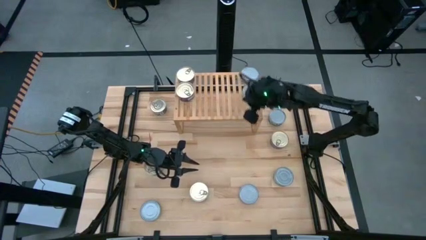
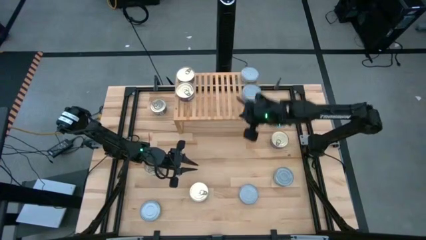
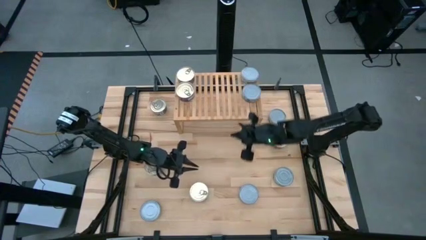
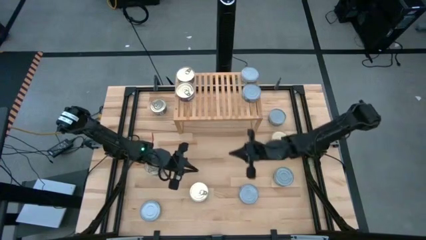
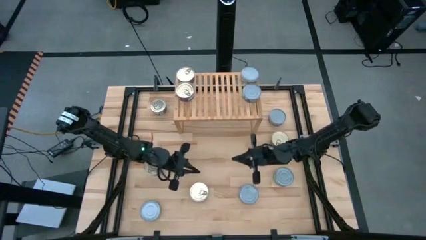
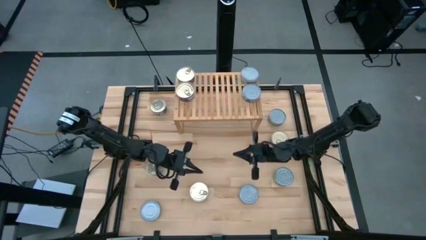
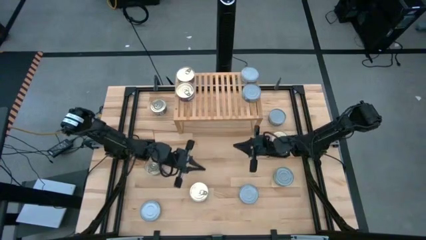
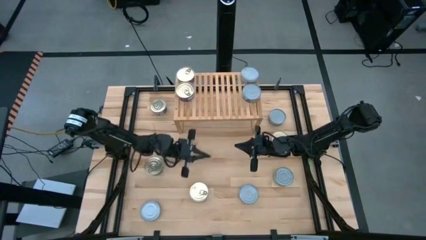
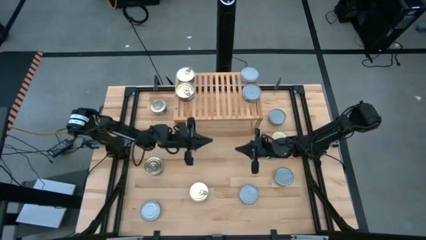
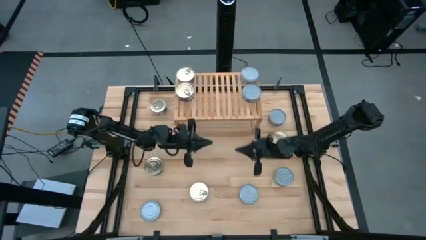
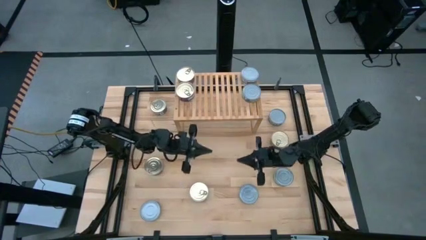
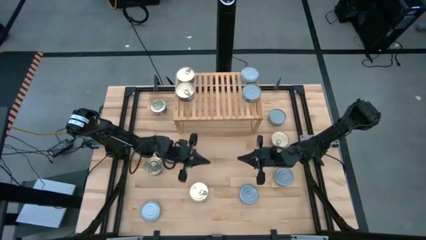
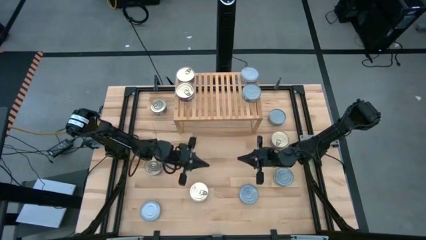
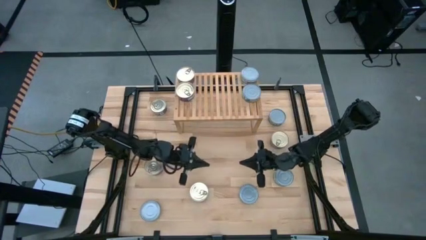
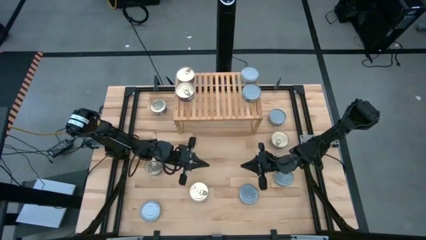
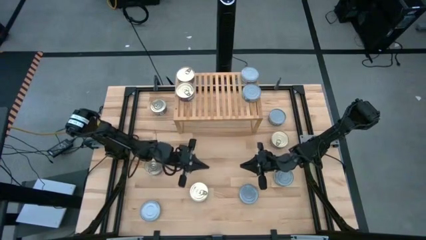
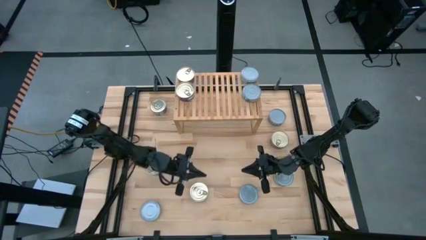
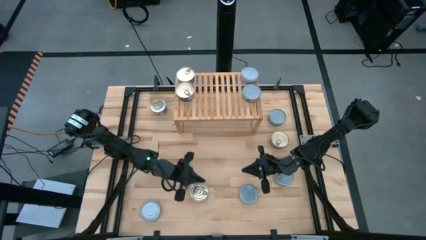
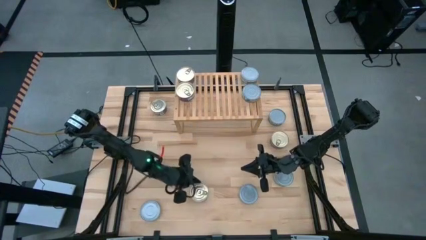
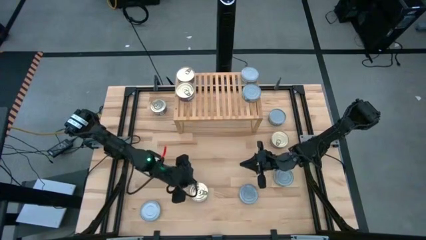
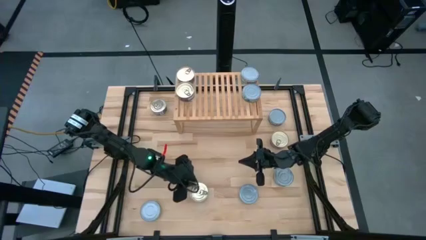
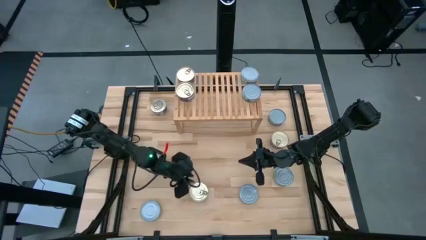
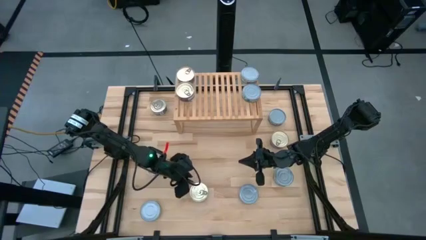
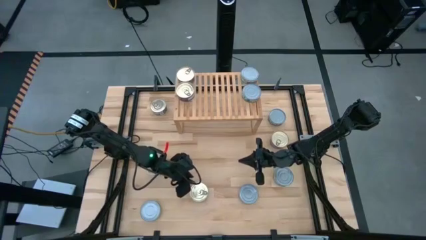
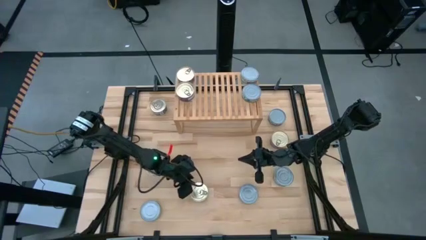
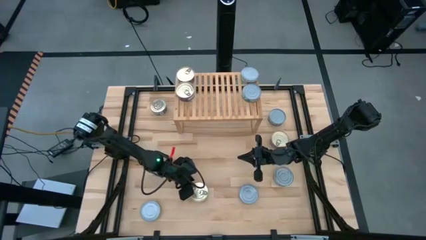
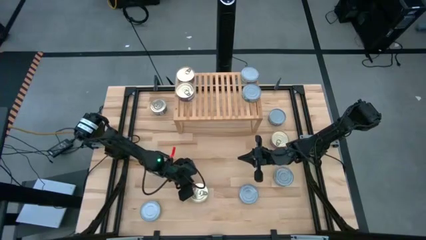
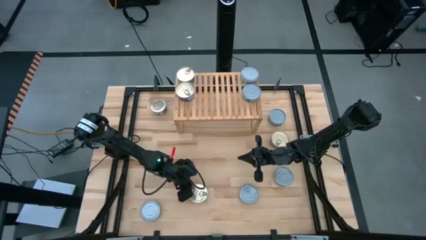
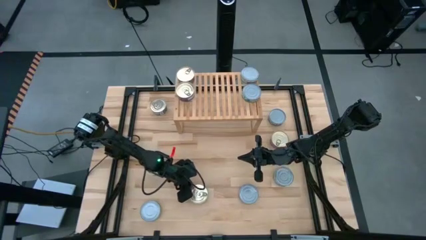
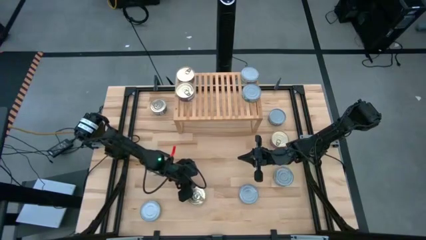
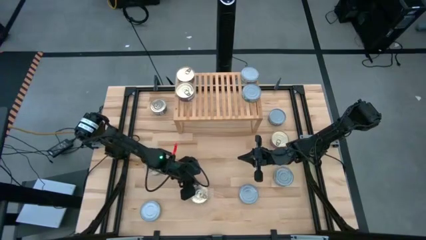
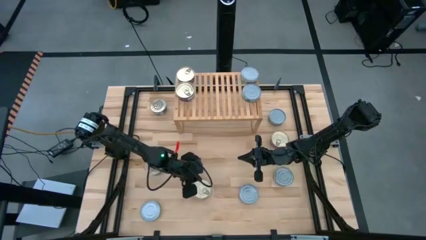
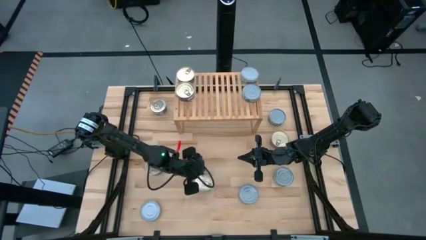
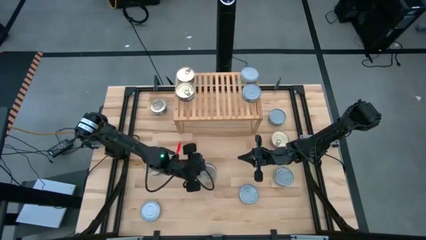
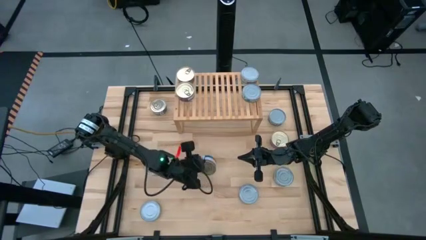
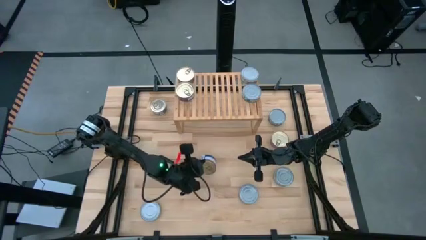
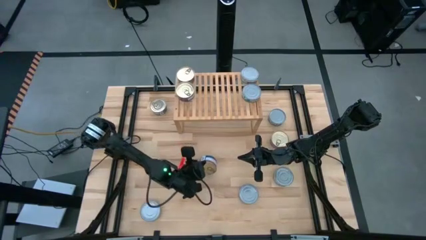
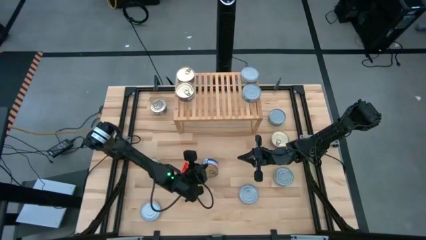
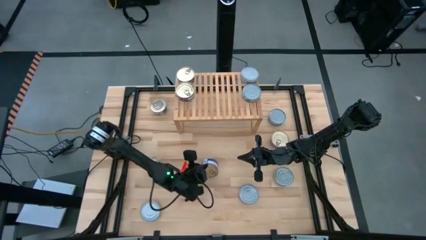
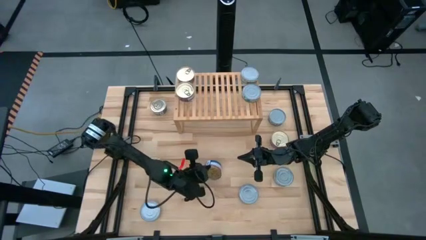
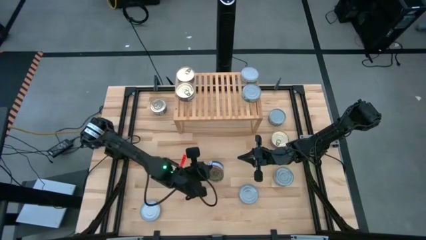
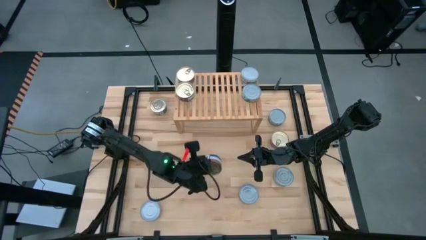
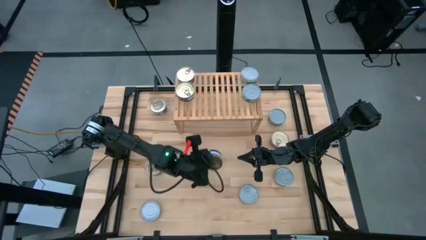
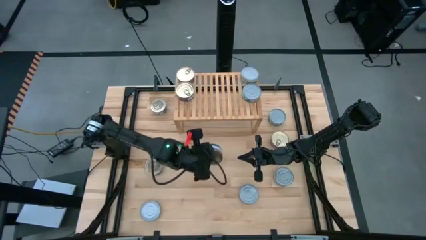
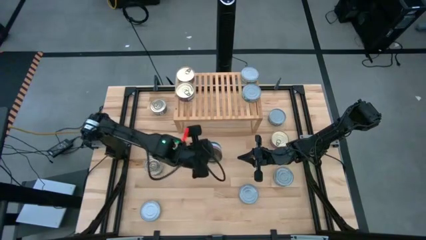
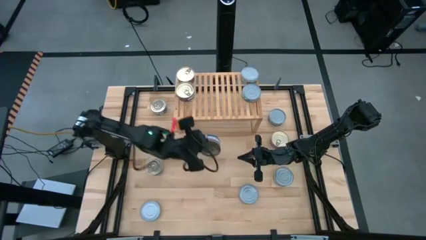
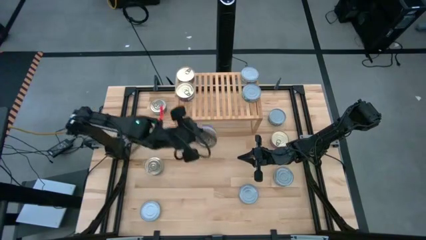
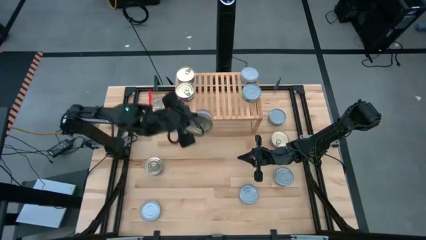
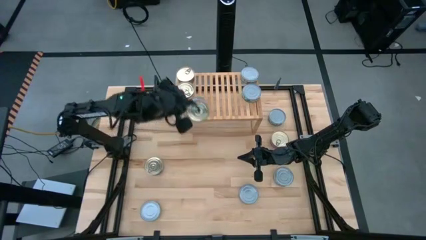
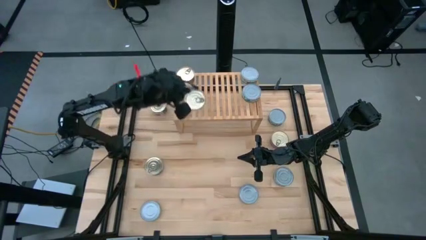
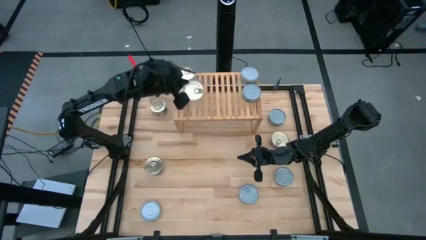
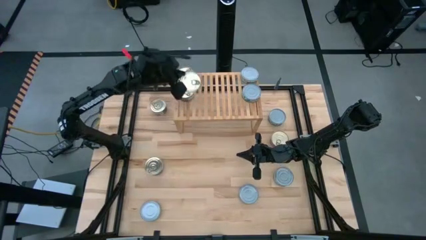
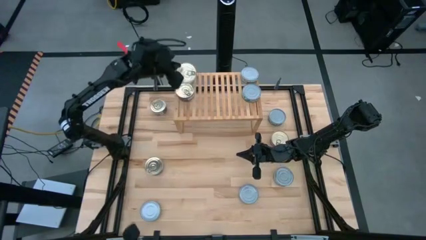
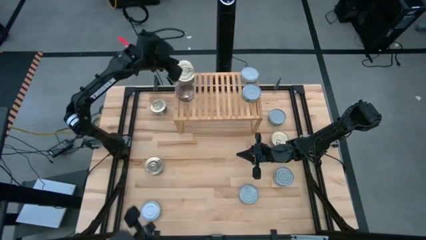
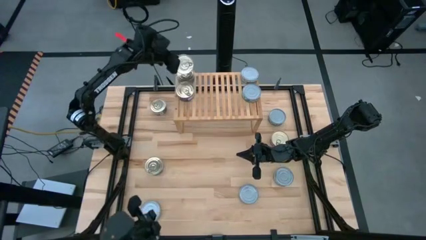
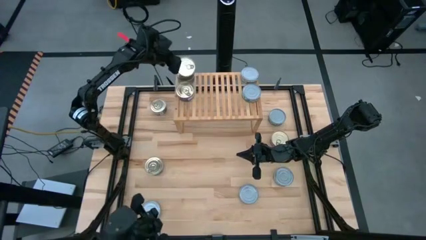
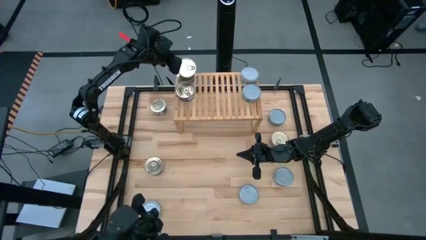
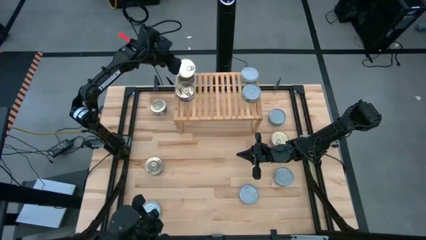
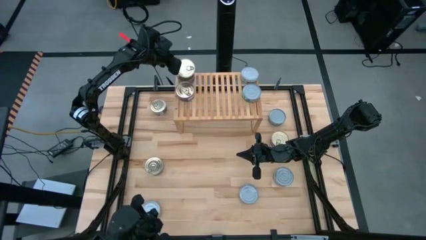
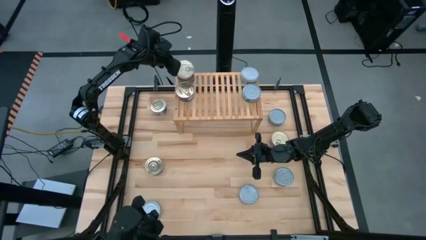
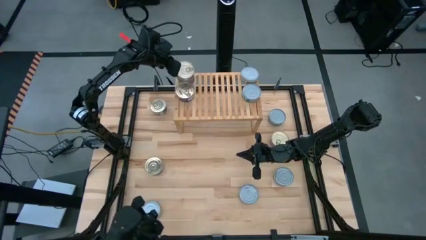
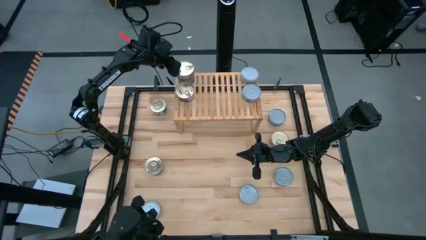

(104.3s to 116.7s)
Task: Stack canned seafood by type on shelf
Stack the blue-pink tuna can on top of the other blue tuna can on the shelf

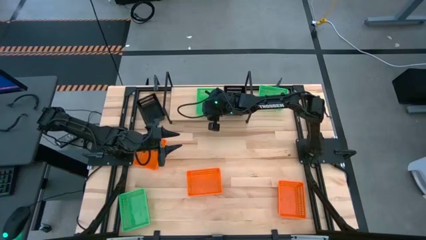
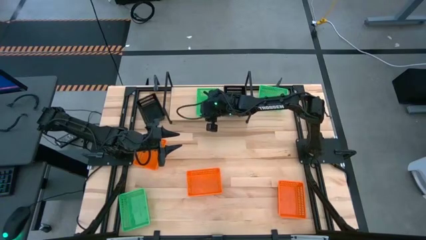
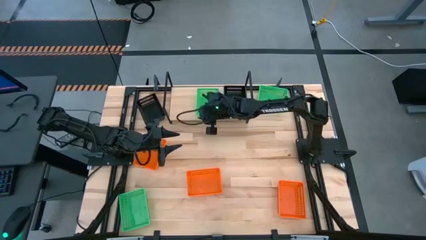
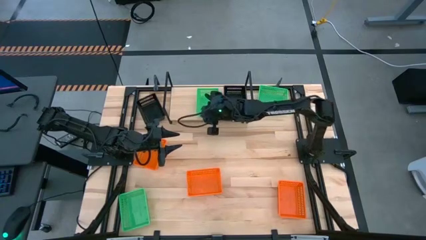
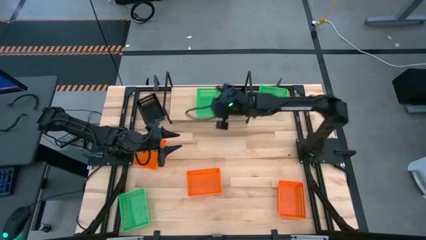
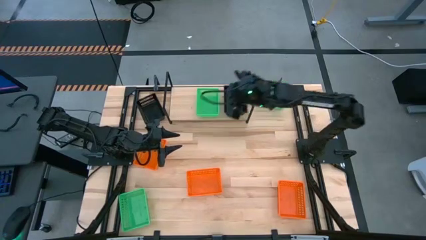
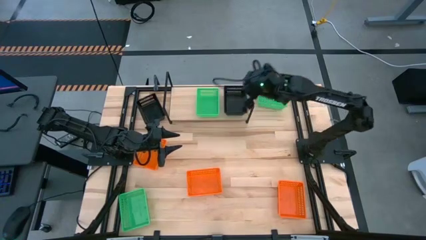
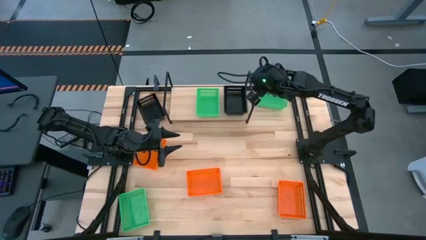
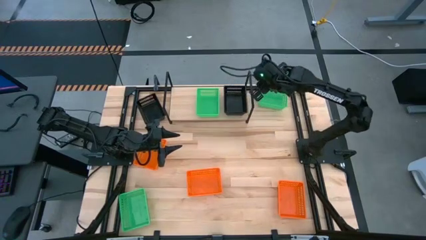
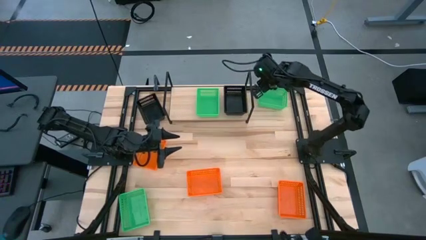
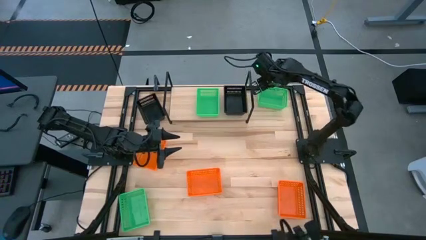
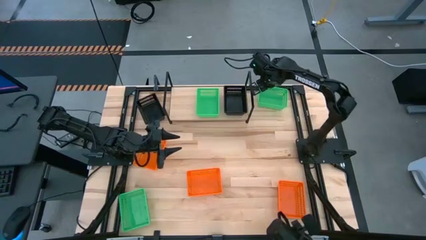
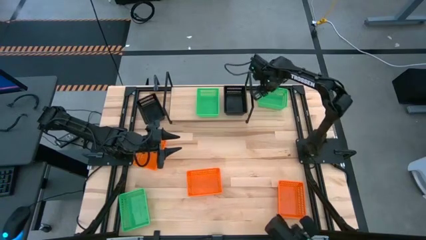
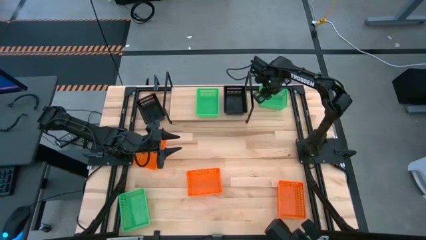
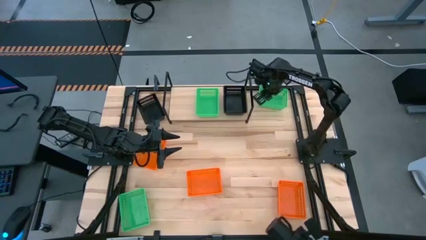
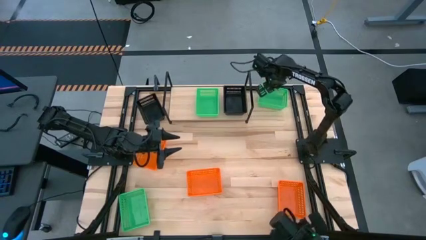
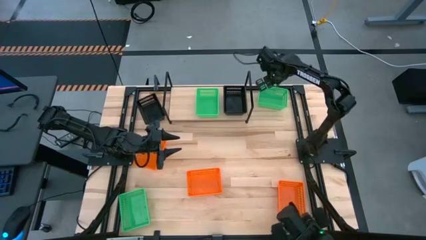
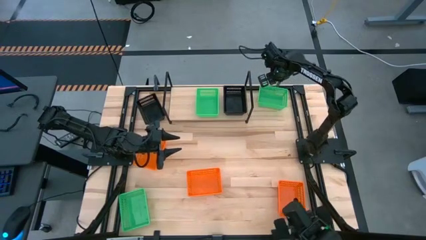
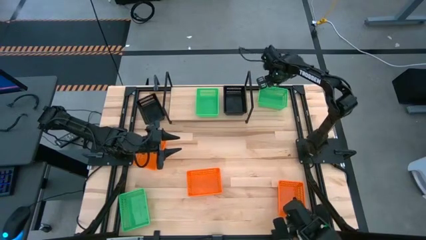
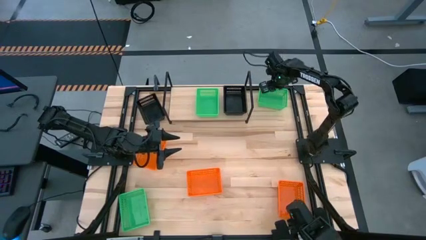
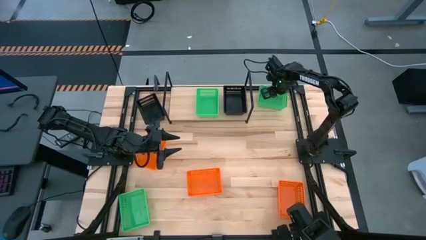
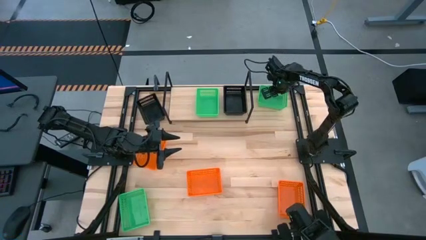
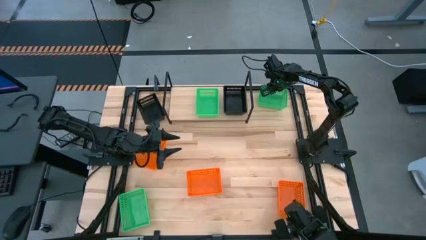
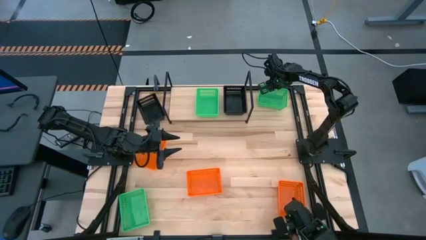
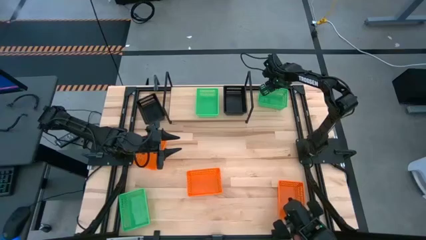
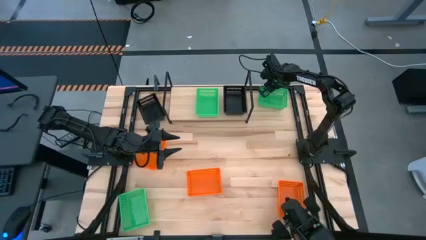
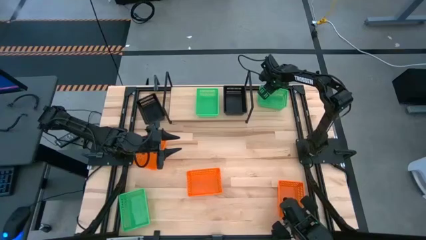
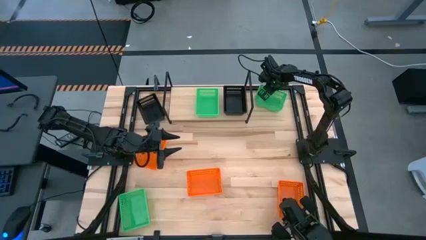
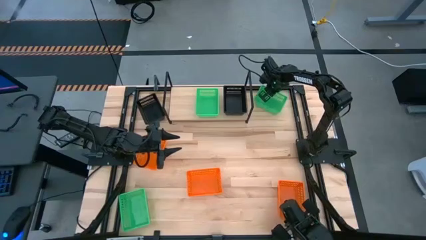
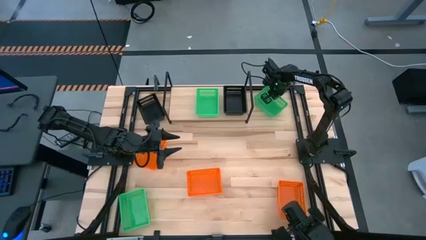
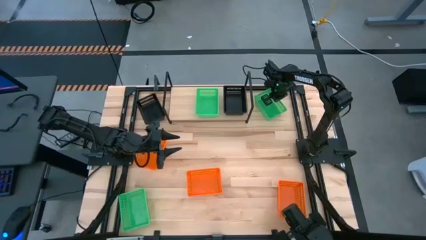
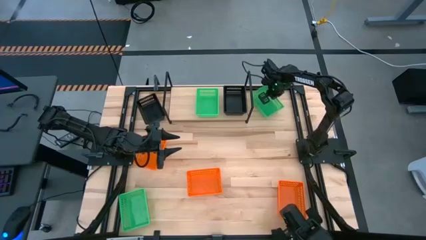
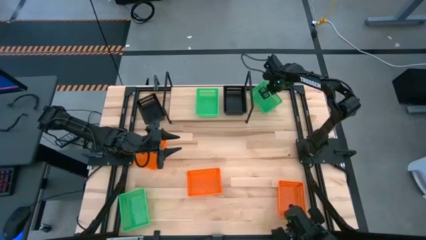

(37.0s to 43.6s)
Task: Stack baskets on shelf by color
Stack the top green bin on top of the green bin on the shelf
